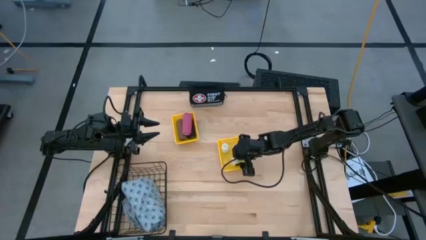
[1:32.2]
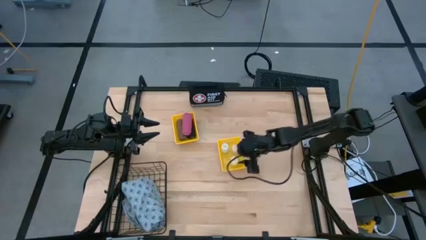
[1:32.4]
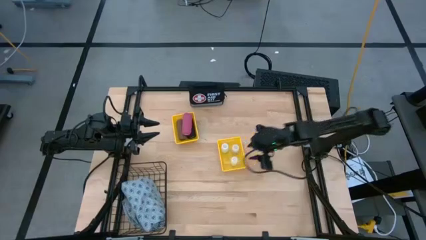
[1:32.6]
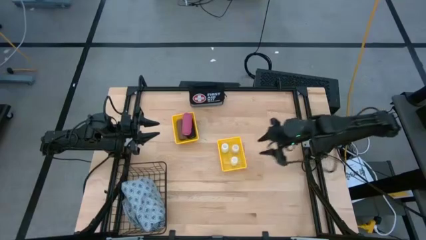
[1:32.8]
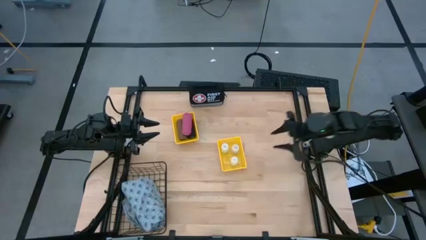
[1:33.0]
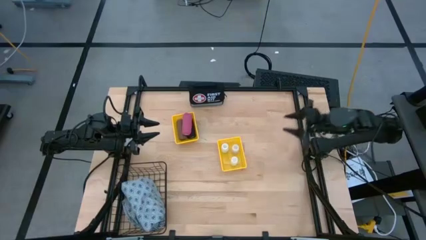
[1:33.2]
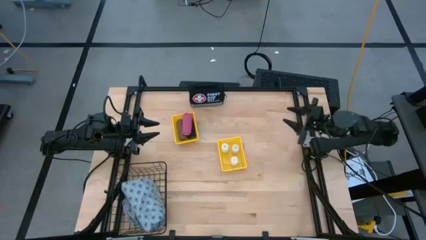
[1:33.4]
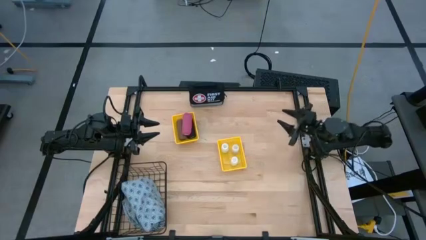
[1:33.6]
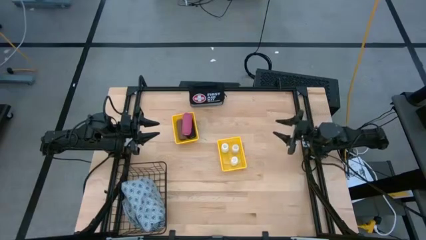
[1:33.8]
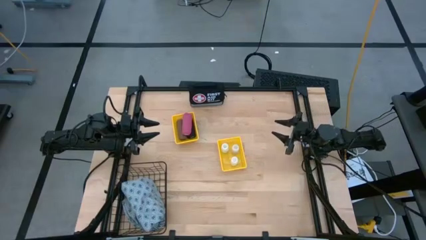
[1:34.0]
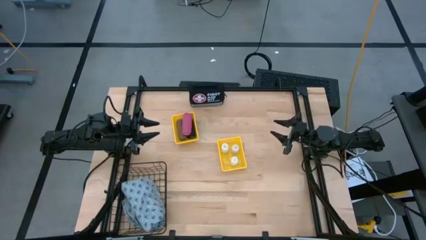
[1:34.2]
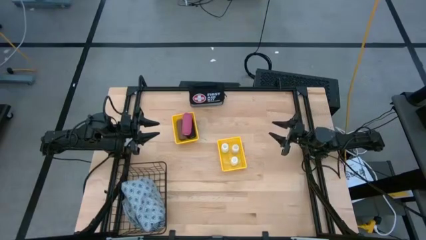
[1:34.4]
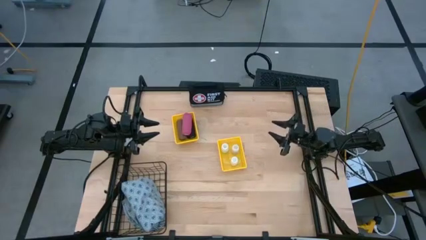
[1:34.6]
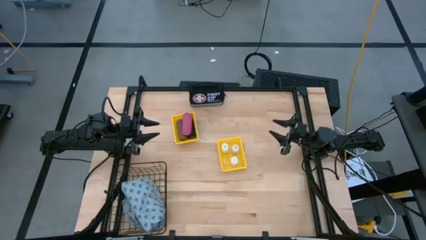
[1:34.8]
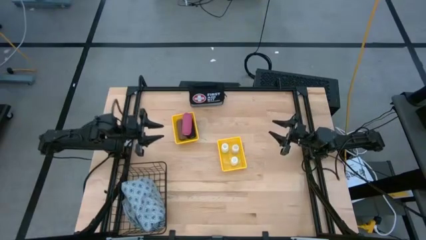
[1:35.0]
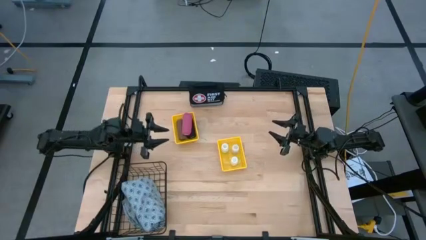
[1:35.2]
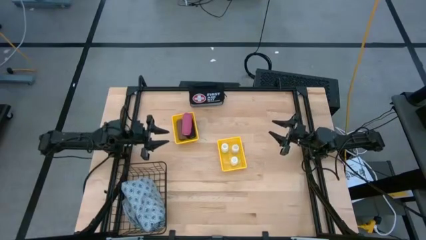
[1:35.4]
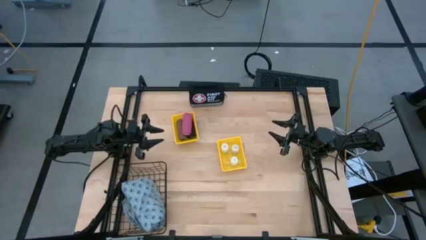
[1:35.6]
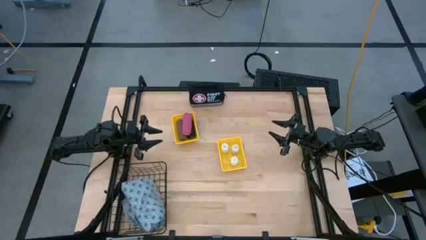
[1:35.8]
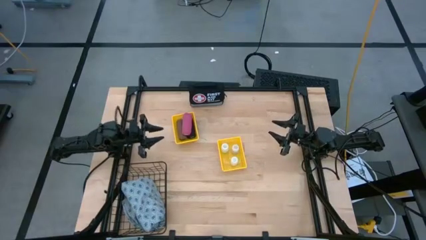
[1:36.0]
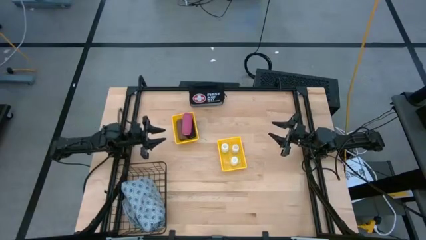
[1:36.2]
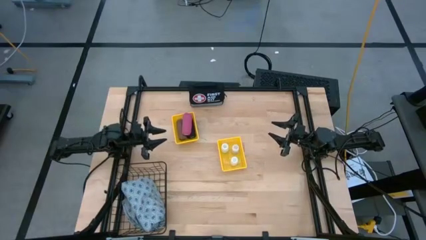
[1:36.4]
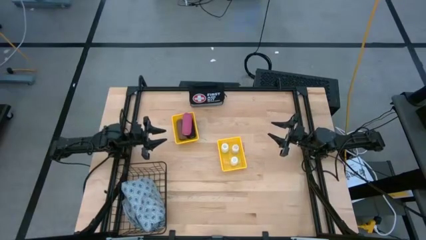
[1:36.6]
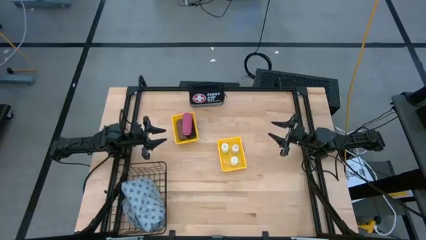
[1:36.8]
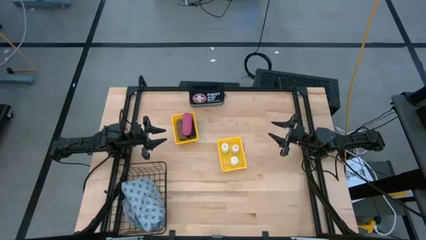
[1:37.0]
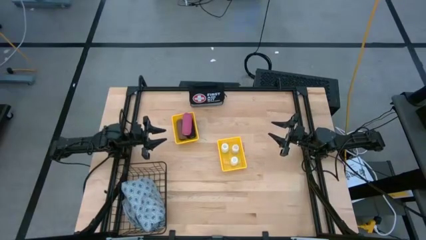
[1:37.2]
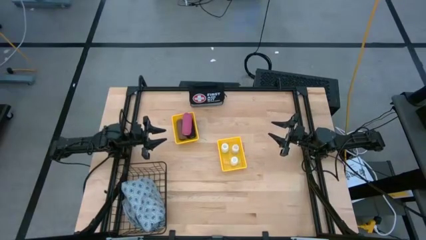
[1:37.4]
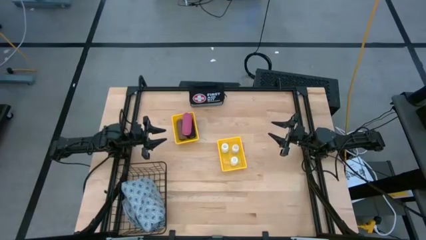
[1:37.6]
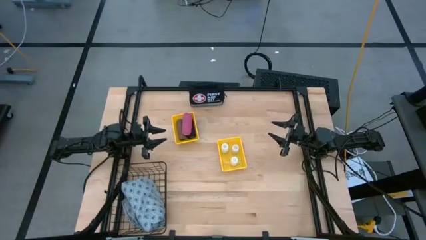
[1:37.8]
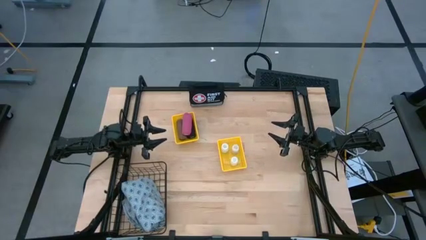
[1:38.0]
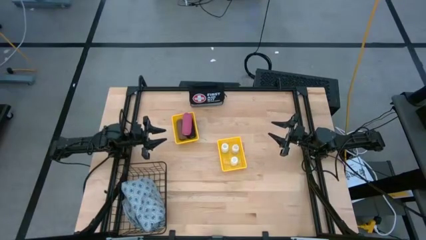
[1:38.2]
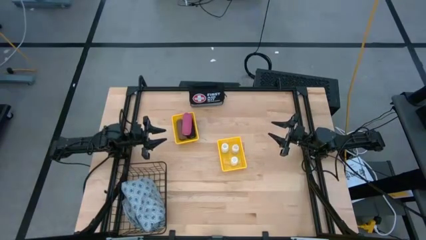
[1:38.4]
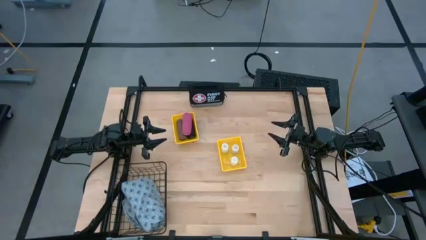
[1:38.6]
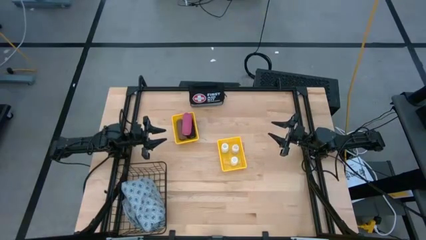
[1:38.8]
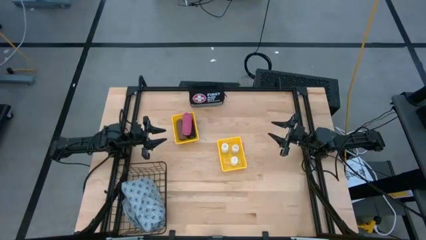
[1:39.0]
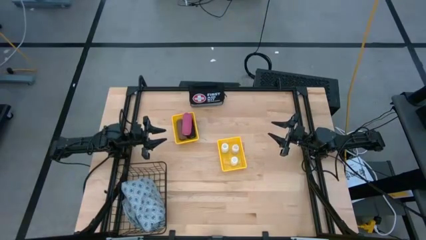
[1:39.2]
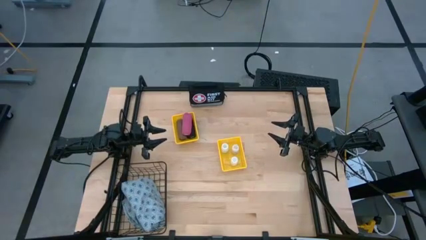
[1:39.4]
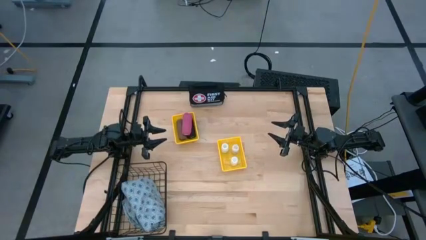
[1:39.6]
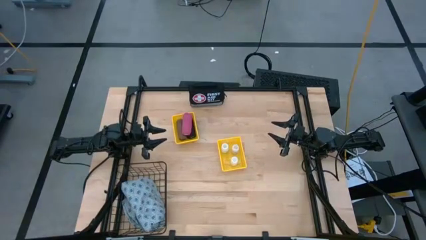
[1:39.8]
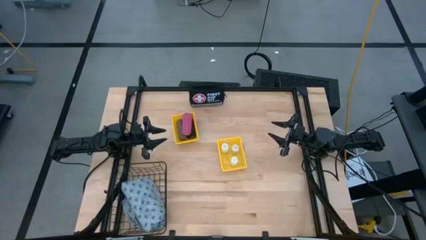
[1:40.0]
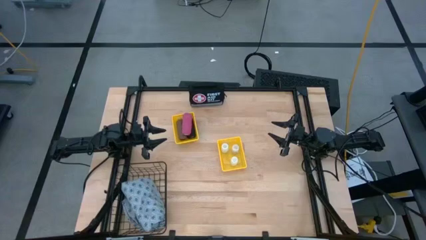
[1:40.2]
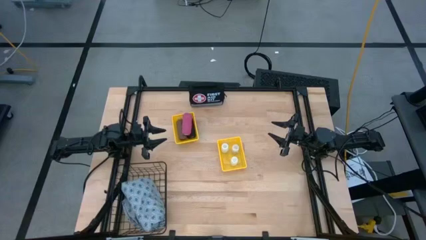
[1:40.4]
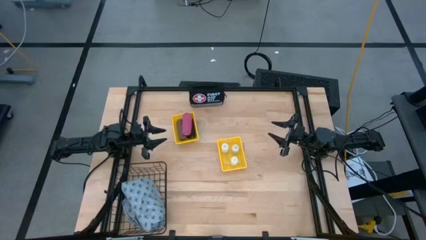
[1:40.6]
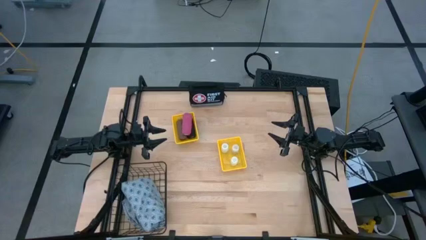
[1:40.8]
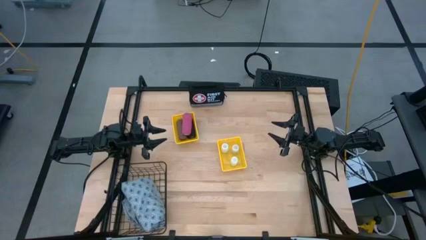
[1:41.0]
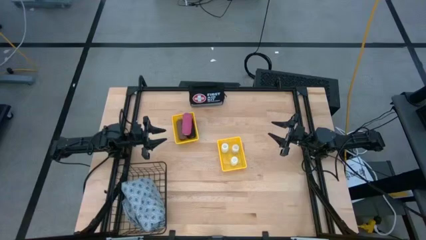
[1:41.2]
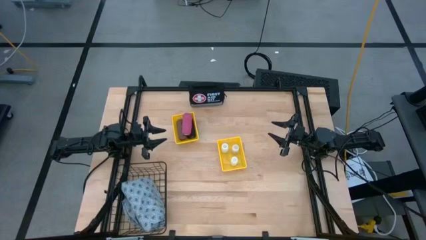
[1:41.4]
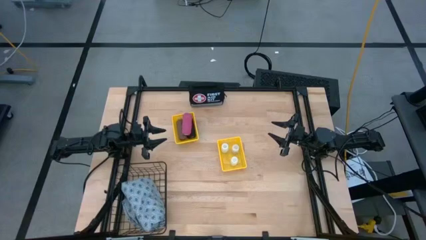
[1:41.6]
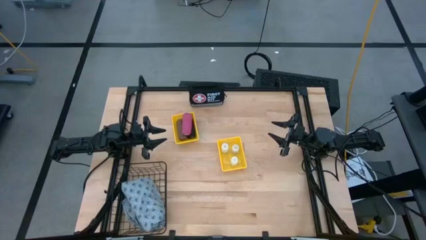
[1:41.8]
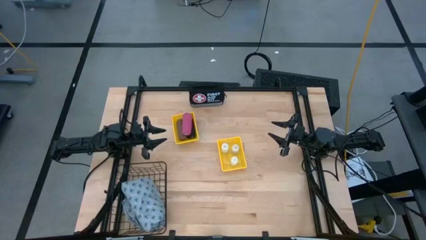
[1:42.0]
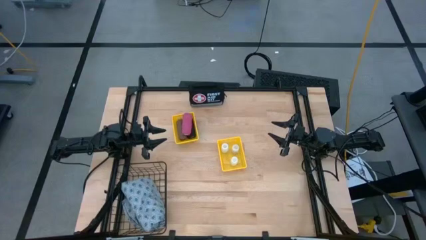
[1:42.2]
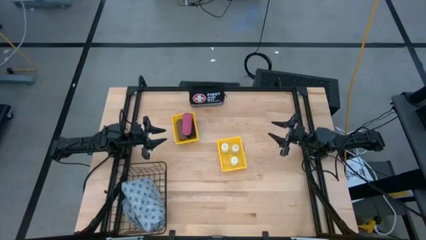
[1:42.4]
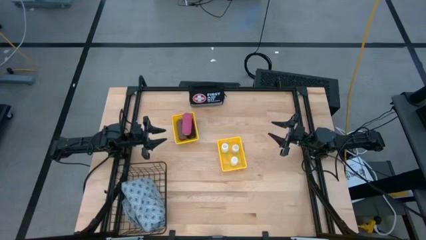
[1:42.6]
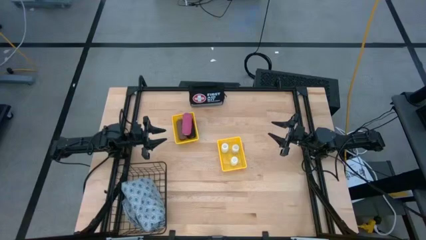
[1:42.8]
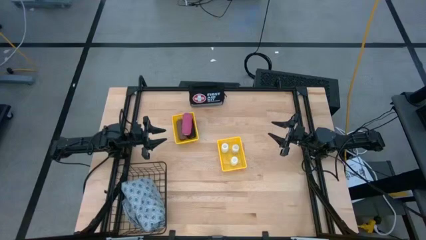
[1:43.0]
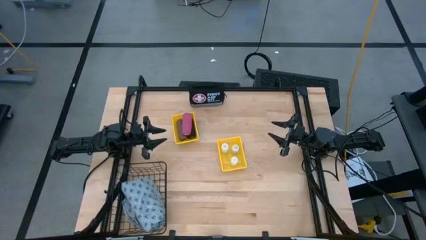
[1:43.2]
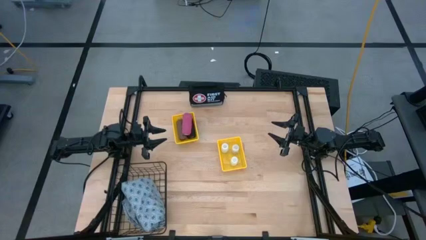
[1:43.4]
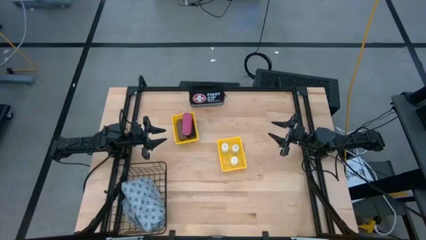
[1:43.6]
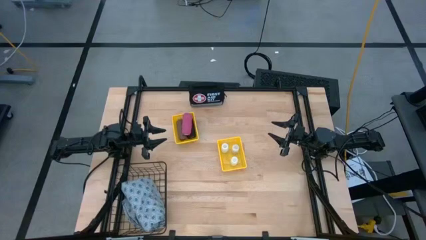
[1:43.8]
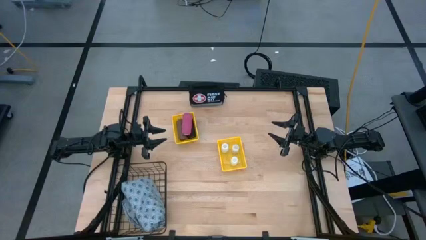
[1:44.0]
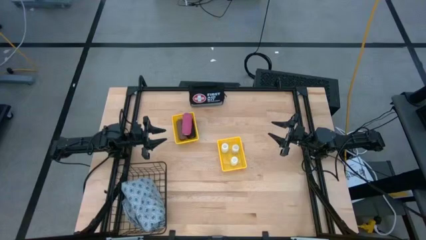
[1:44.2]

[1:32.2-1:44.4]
Task: Pick & Place Medicine items
Return to Home Position
